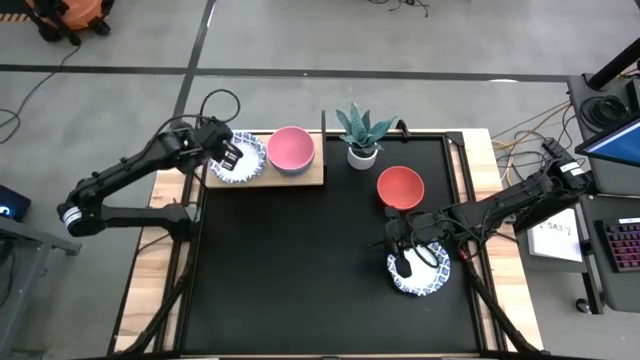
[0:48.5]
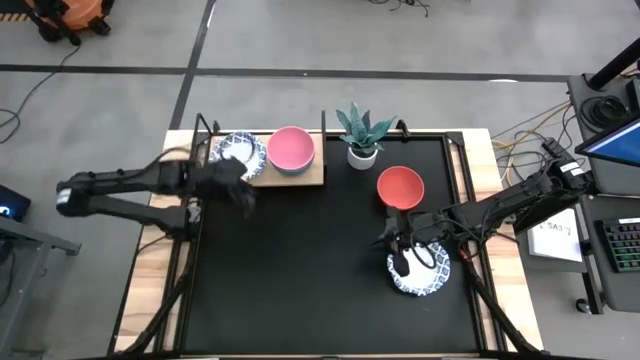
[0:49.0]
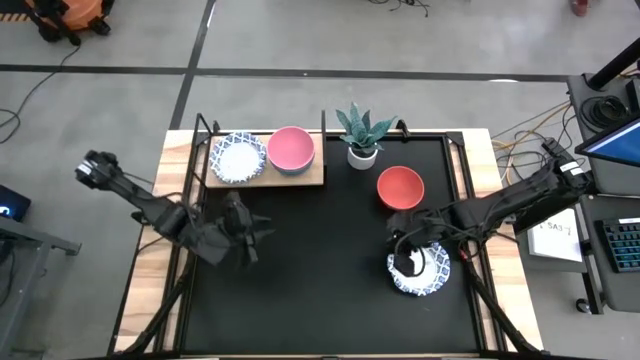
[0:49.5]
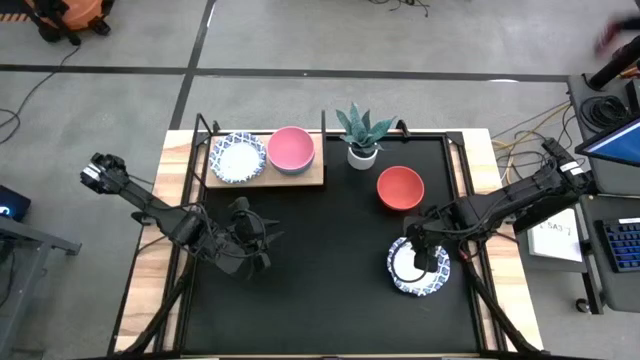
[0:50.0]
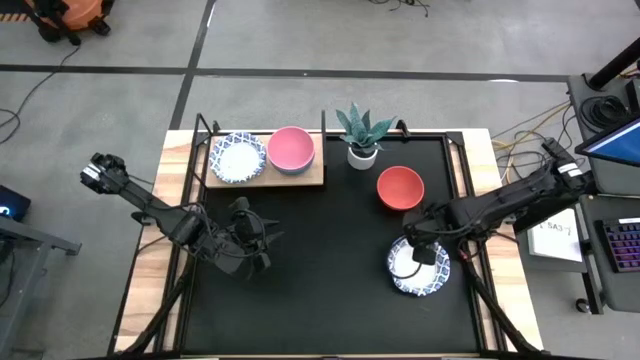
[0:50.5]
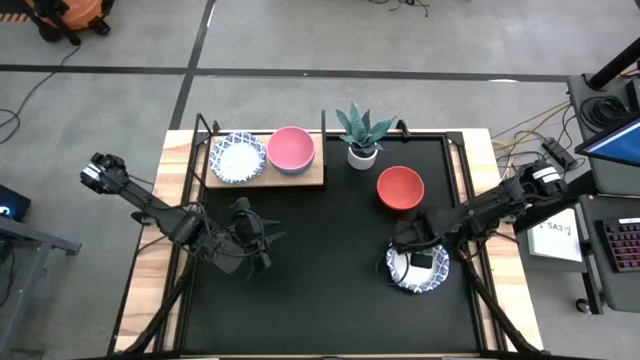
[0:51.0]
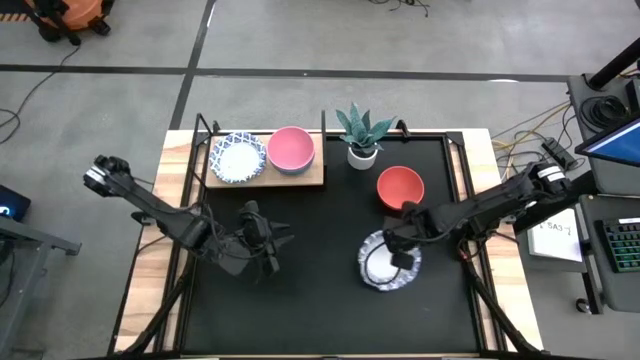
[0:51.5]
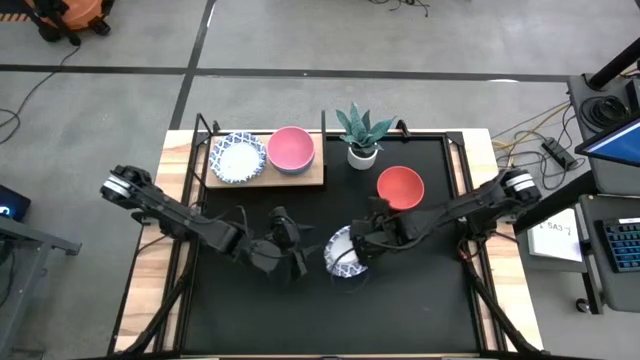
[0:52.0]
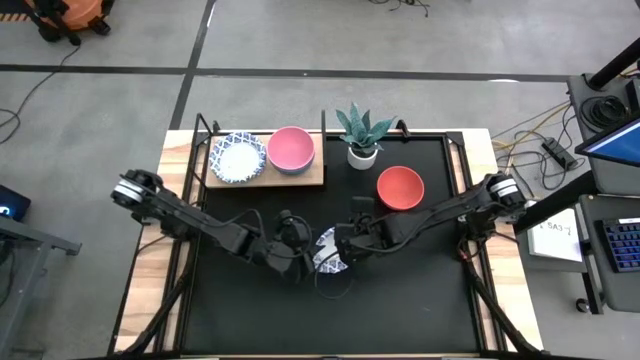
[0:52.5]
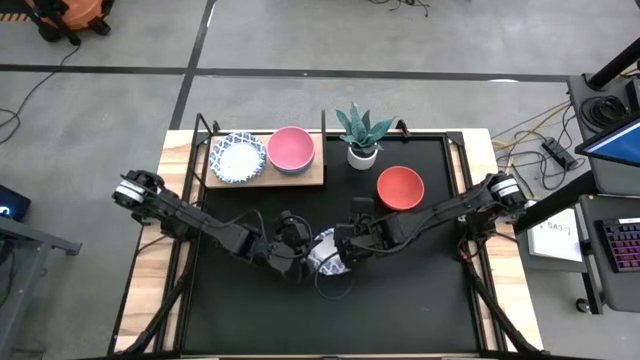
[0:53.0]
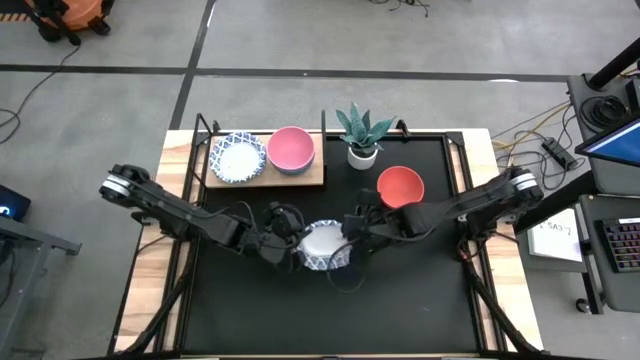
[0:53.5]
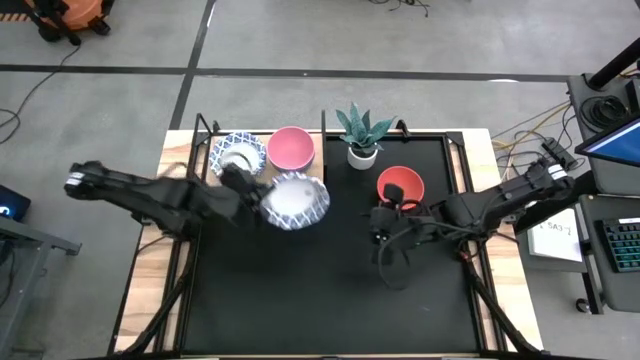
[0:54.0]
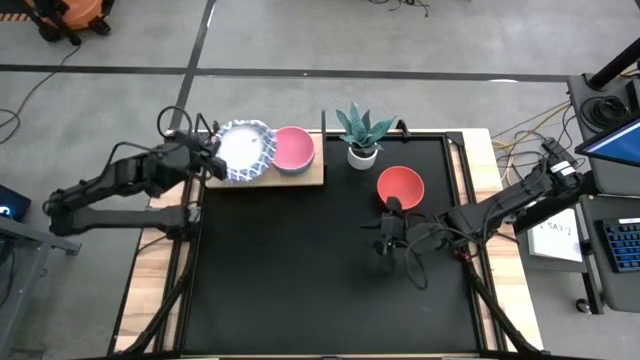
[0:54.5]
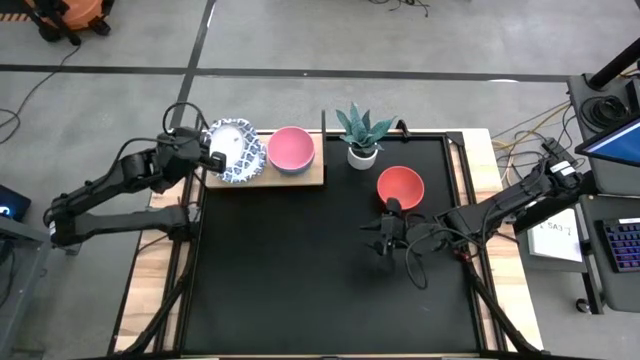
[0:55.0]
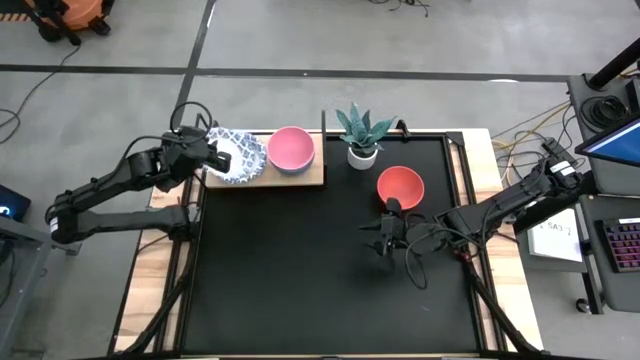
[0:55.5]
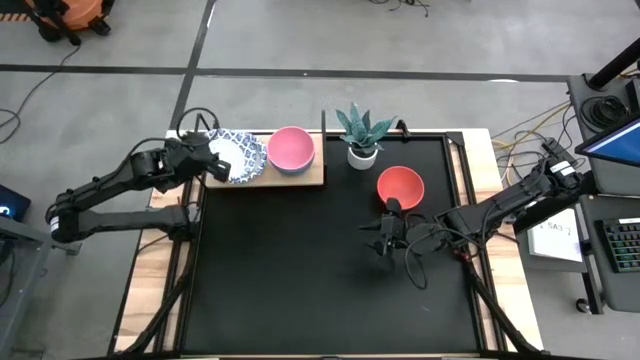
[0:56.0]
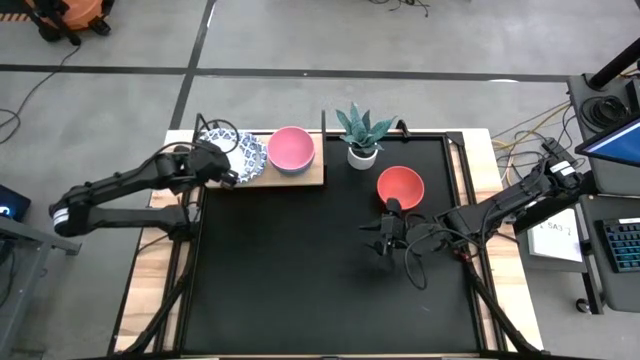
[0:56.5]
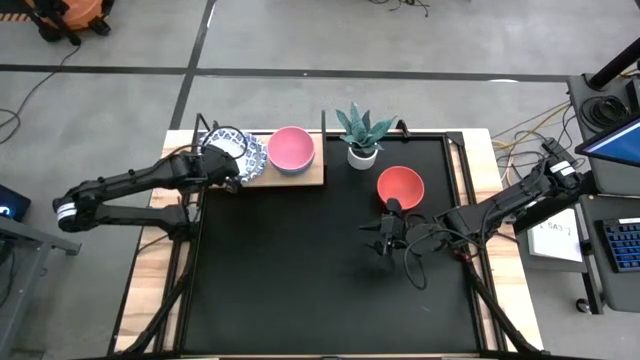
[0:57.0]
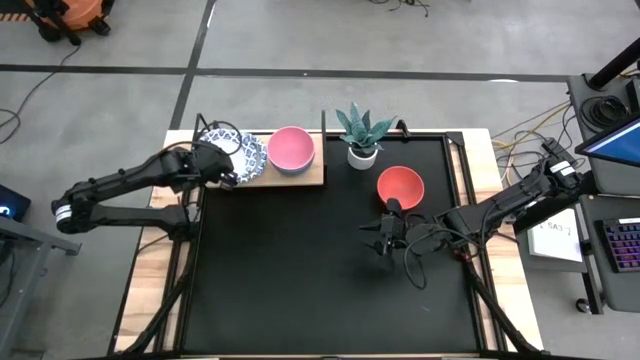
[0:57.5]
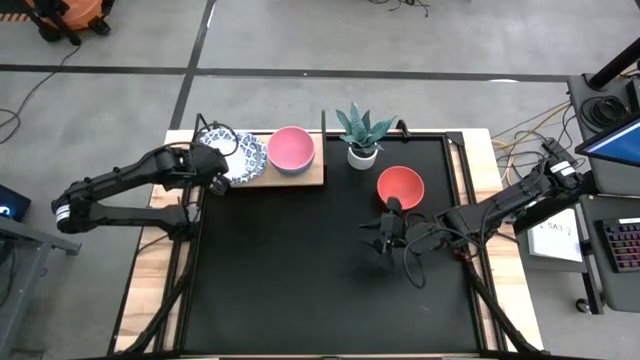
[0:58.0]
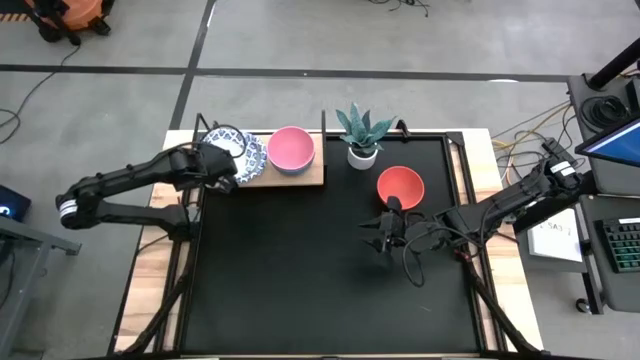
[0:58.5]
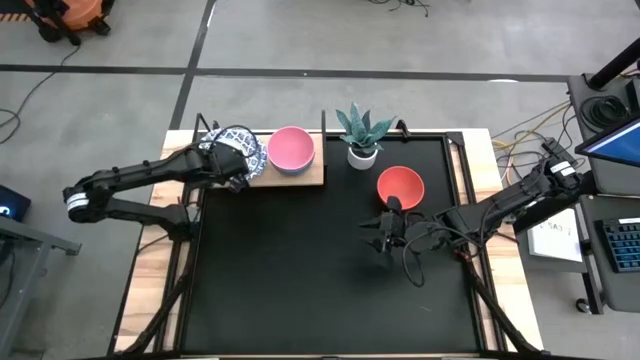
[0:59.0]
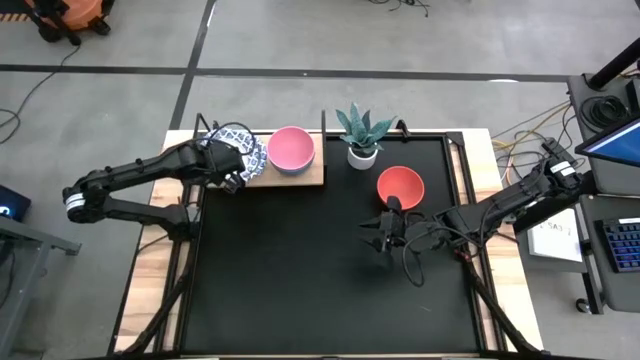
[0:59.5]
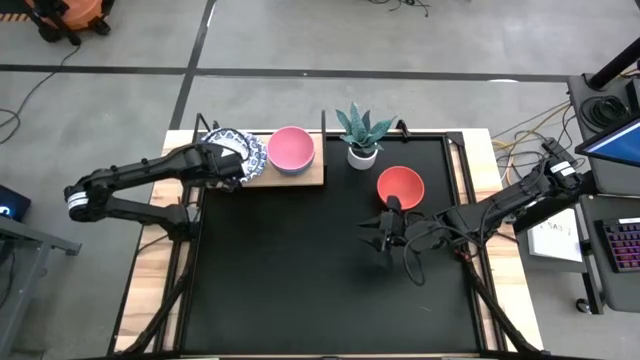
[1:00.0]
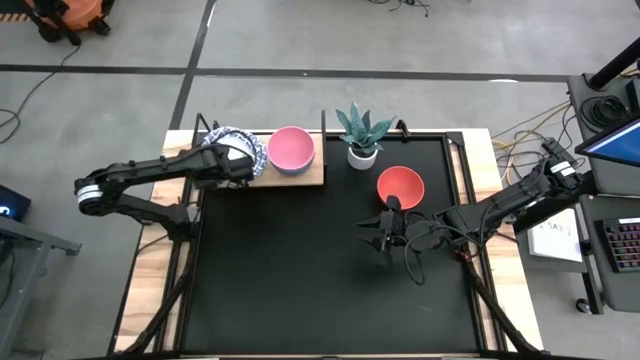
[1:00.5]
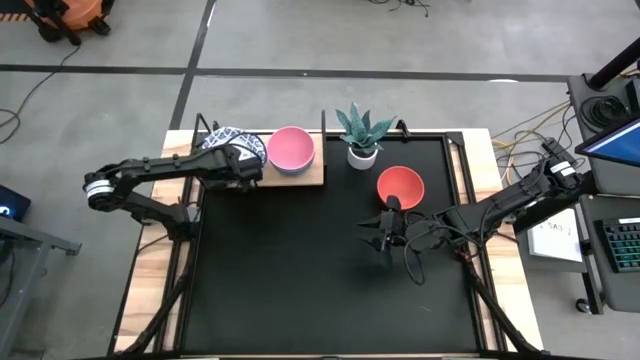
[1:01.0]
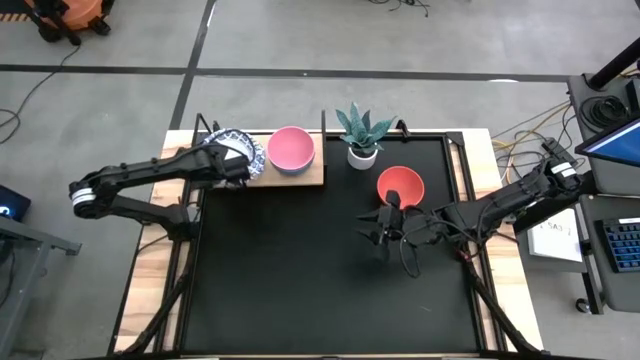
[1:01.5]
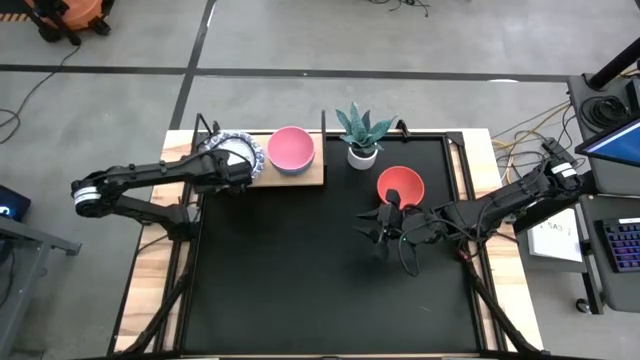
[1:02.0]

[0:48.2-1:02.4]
Task: Place and stack bowls onto a shelf
Stack the white patterned bowl on top of the other white patterned bowl on the shelf

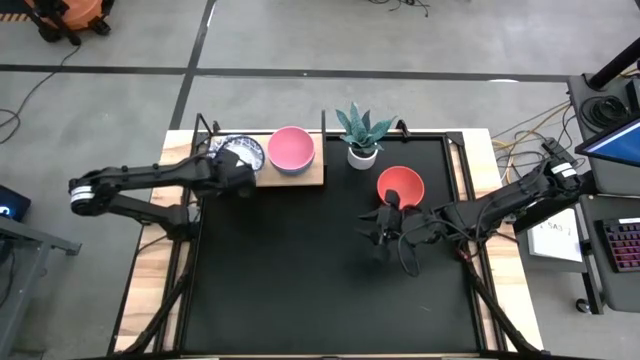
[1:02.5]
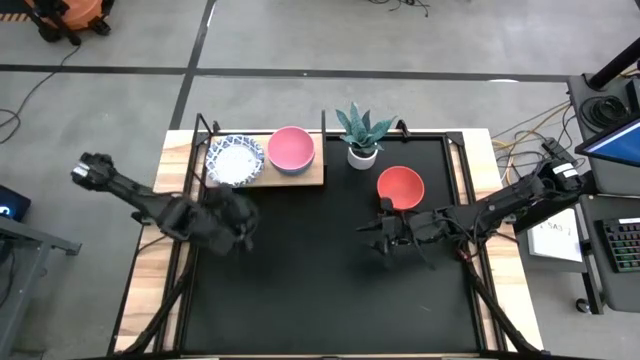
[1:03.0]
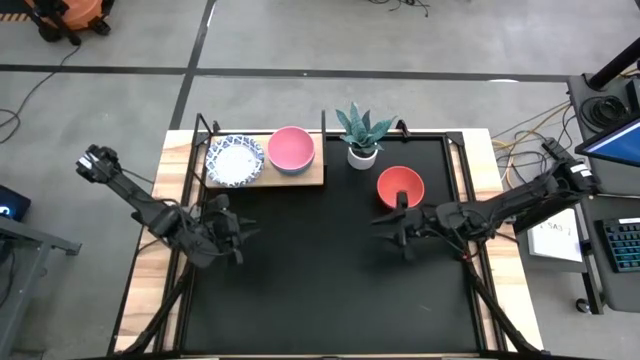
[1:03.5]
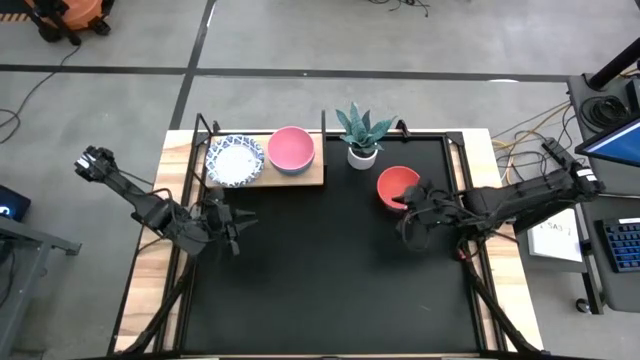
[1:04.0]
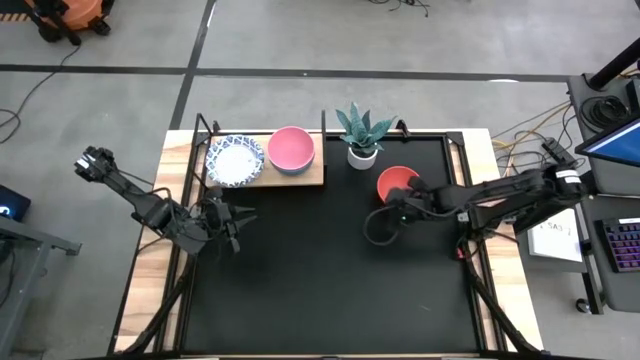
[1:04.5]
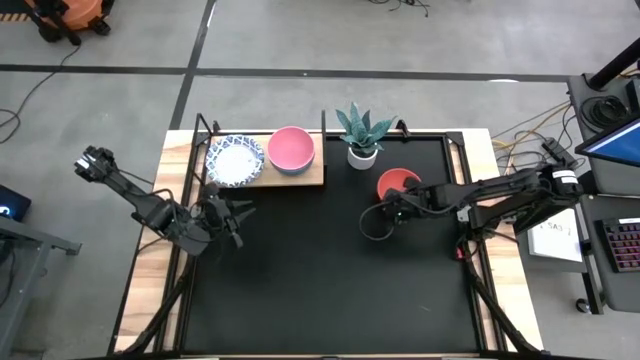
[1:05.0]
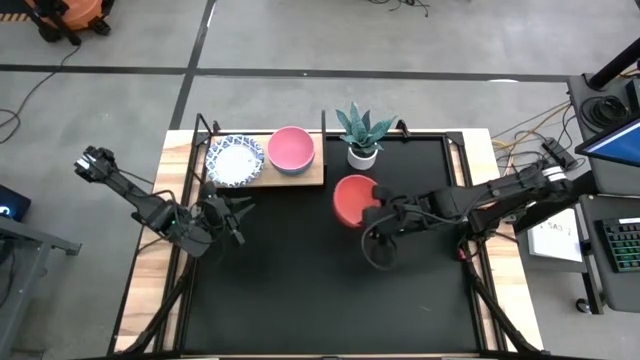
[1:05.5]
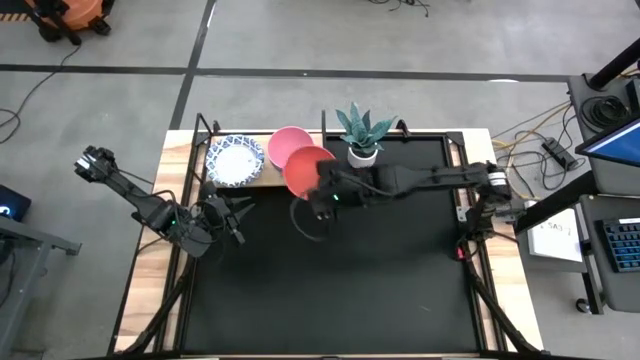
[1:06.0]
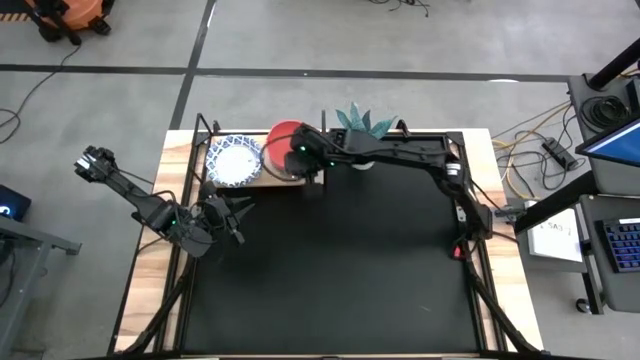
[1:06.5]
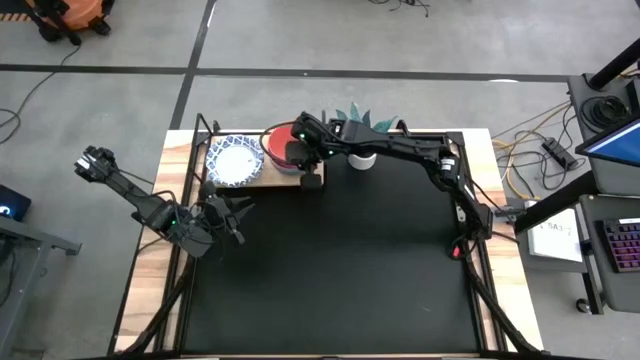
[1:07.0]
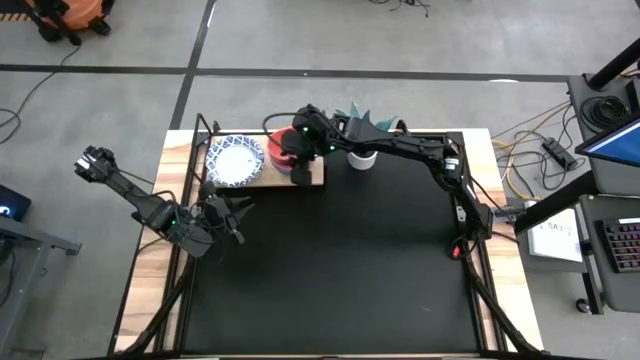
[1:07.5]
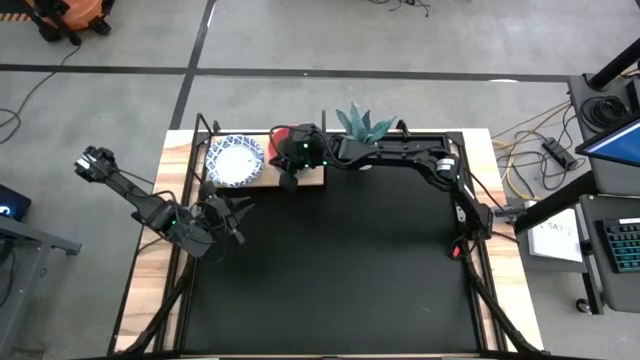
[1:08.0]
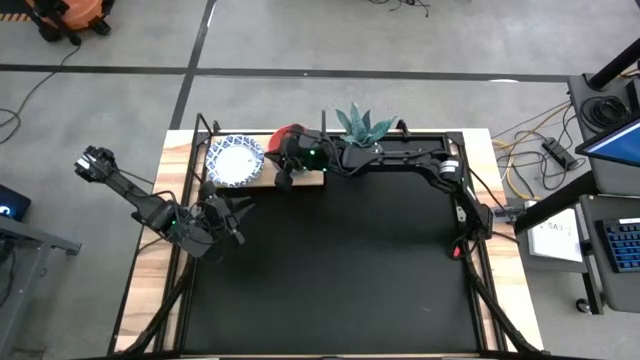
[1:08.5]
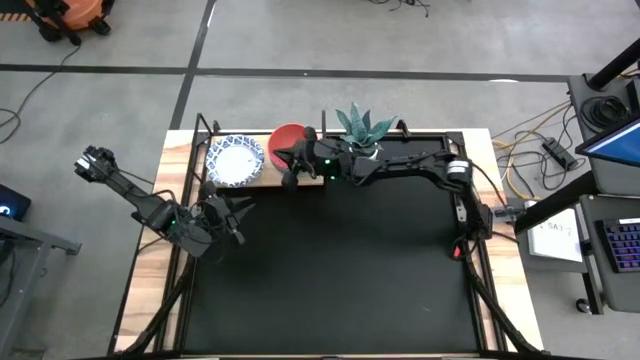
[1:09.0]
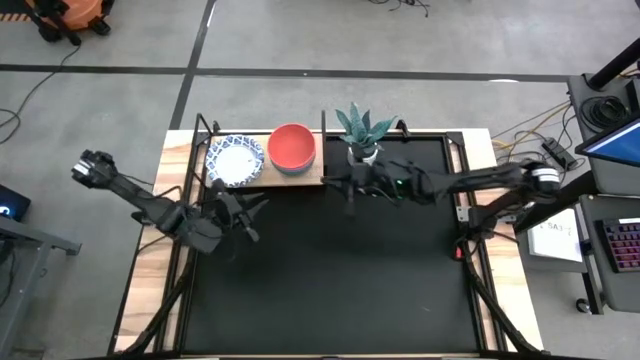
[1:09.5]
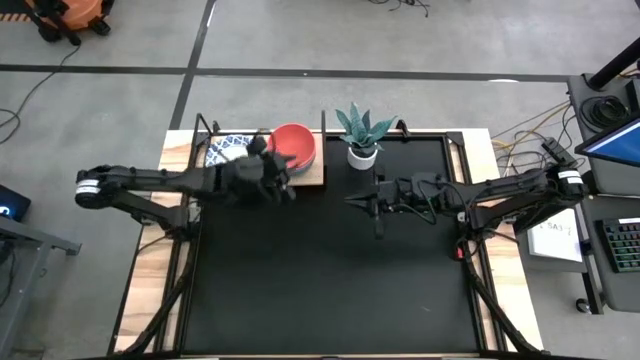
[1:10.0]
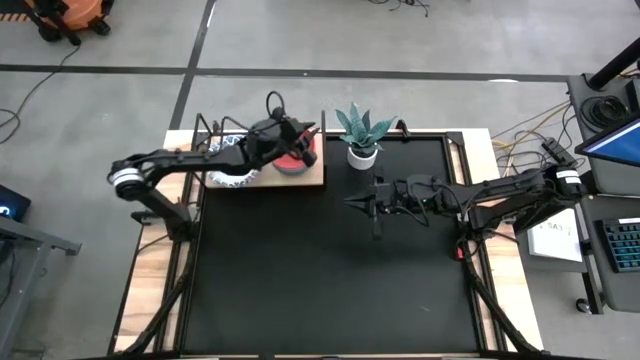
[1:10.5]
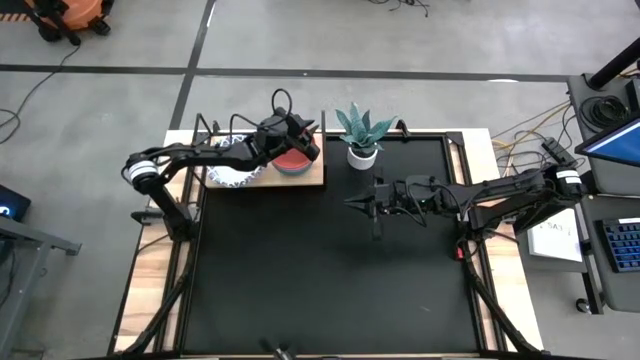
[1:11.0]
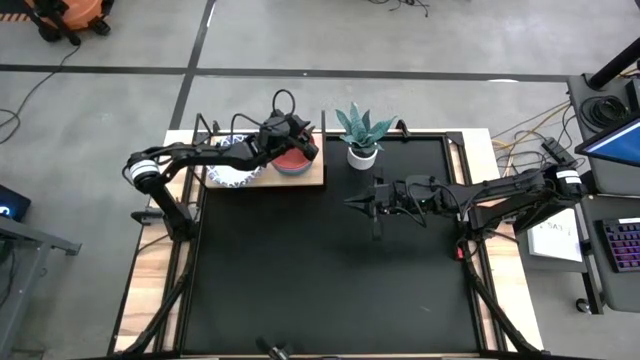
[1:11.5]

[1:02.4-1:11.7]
Stack the orange bowl on top of the pink bowl on the shelf
